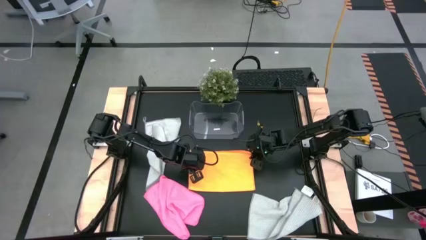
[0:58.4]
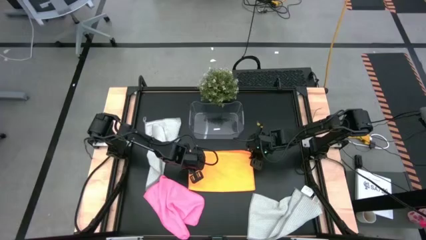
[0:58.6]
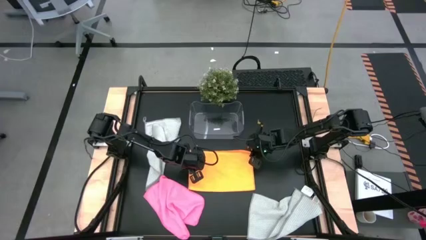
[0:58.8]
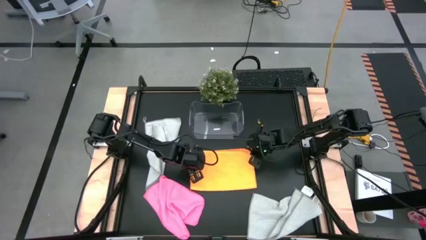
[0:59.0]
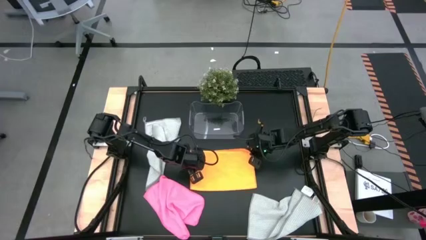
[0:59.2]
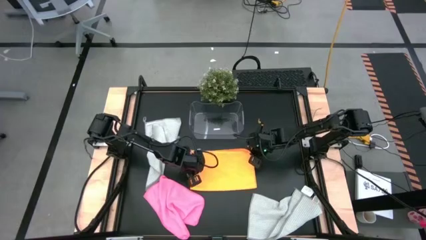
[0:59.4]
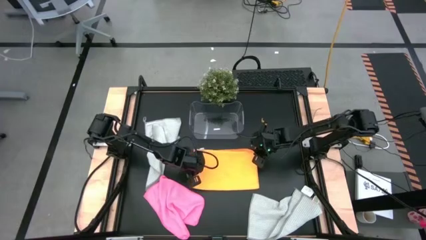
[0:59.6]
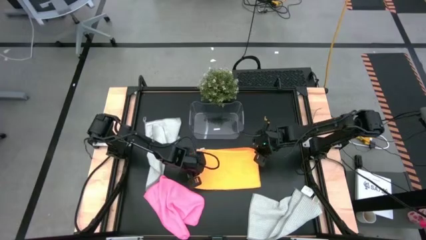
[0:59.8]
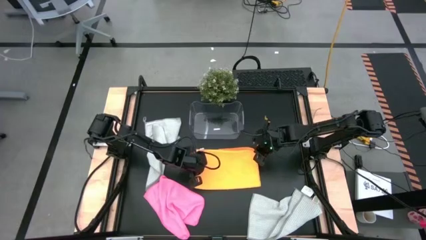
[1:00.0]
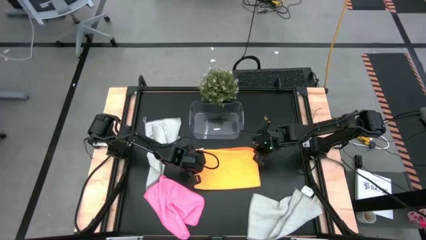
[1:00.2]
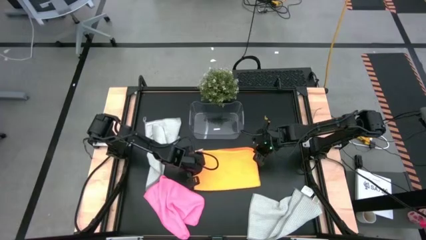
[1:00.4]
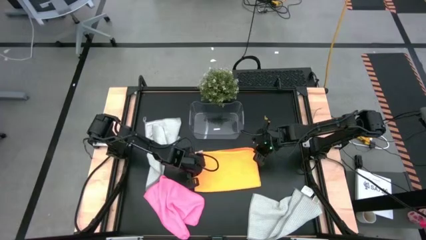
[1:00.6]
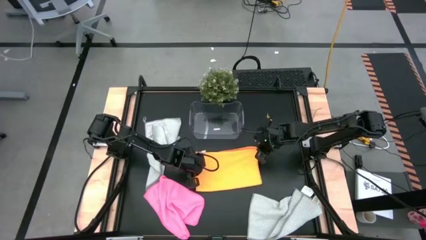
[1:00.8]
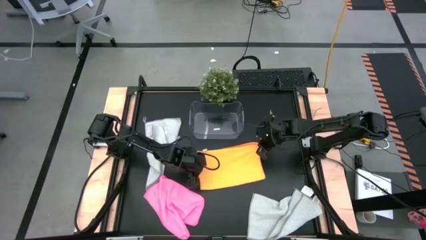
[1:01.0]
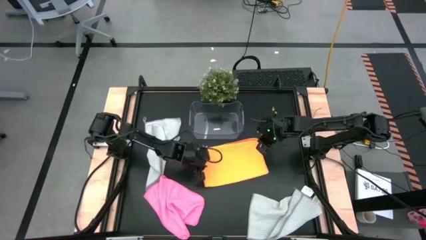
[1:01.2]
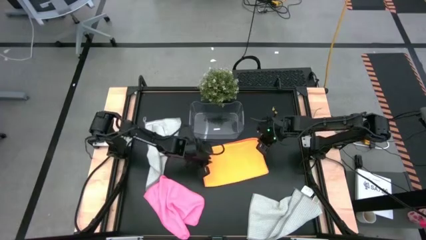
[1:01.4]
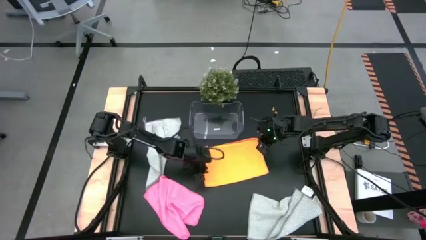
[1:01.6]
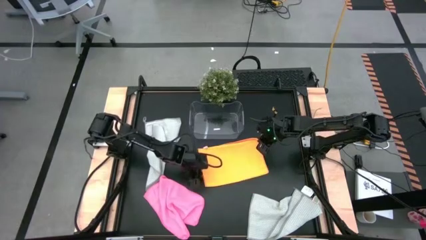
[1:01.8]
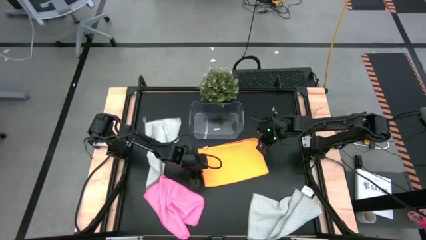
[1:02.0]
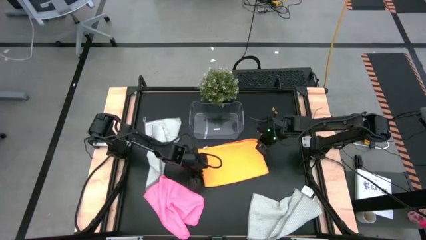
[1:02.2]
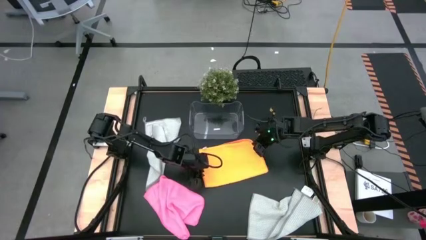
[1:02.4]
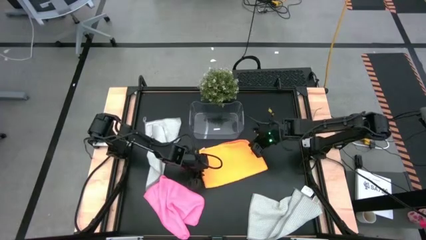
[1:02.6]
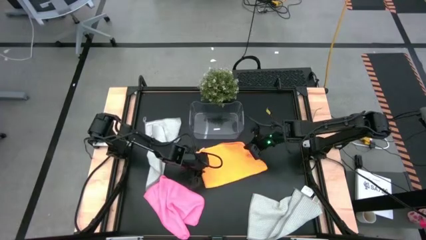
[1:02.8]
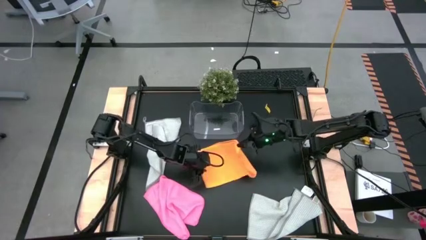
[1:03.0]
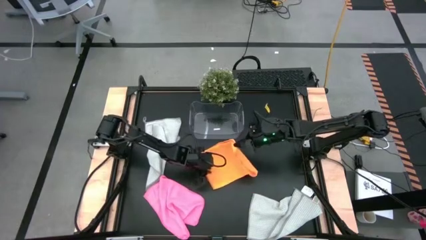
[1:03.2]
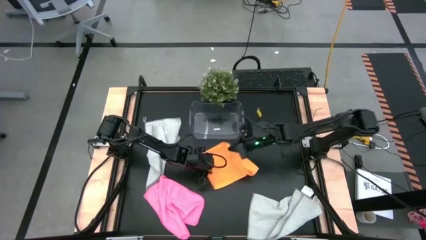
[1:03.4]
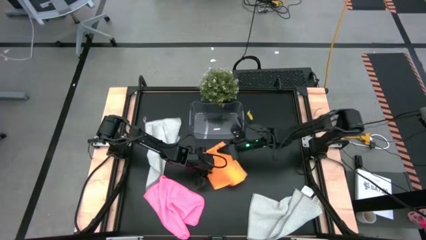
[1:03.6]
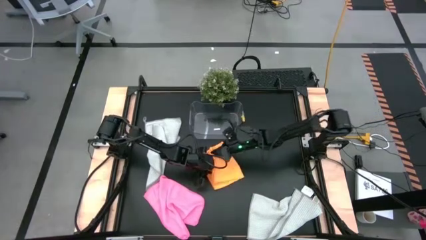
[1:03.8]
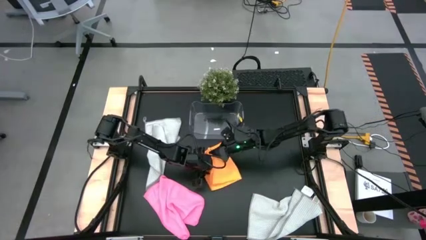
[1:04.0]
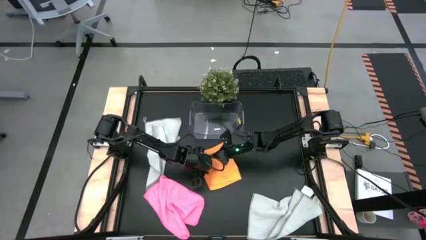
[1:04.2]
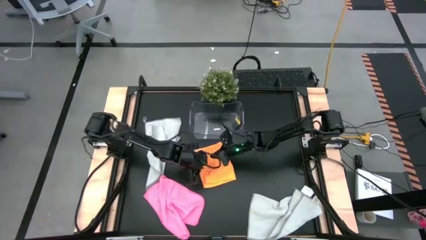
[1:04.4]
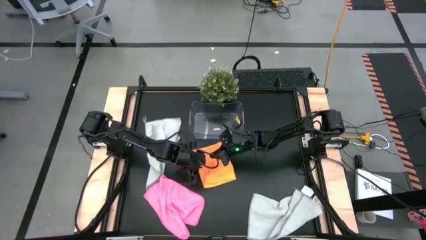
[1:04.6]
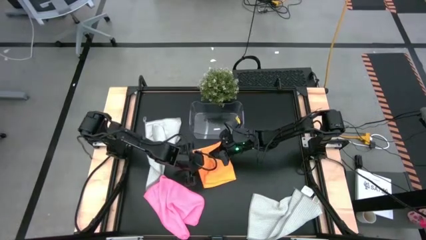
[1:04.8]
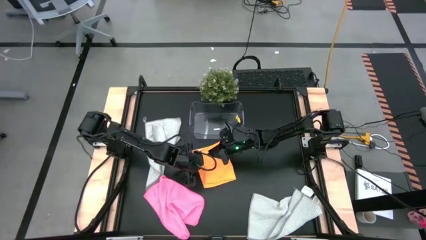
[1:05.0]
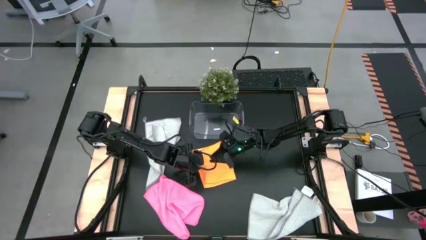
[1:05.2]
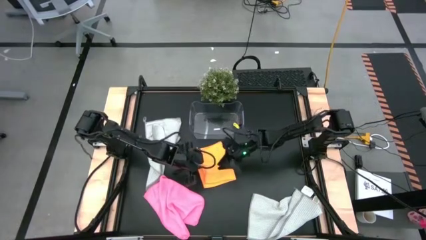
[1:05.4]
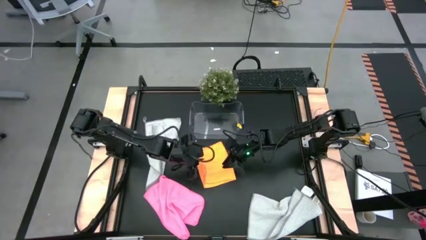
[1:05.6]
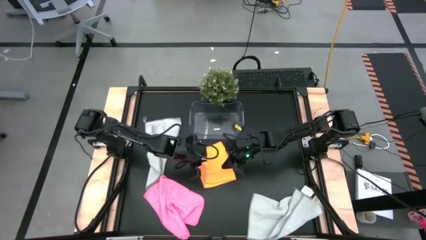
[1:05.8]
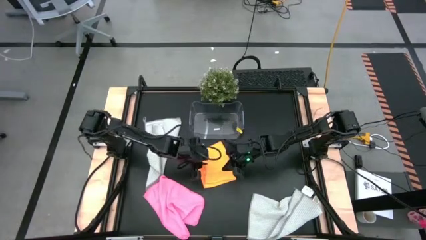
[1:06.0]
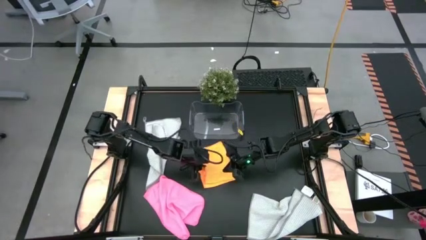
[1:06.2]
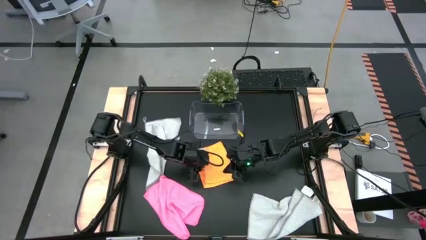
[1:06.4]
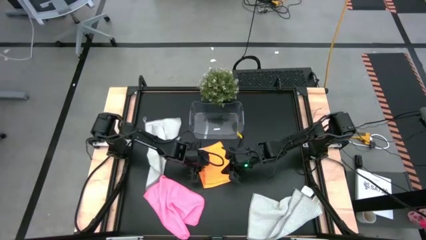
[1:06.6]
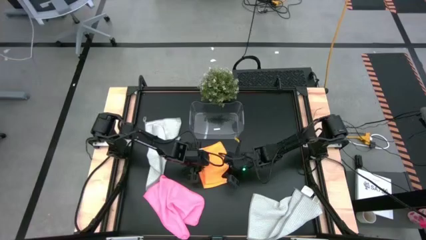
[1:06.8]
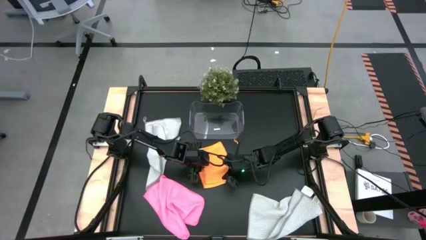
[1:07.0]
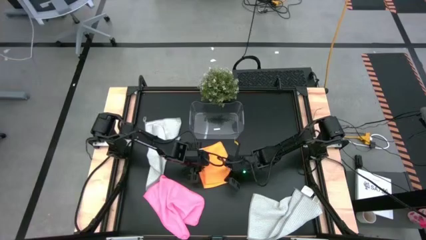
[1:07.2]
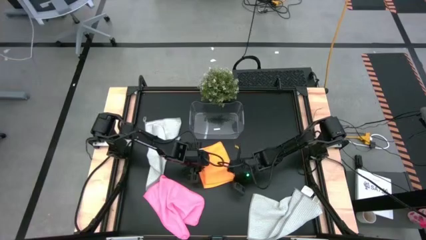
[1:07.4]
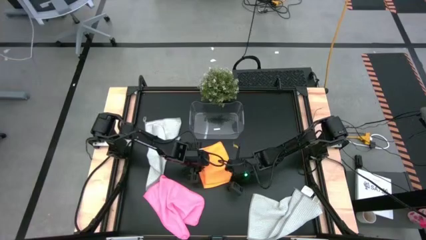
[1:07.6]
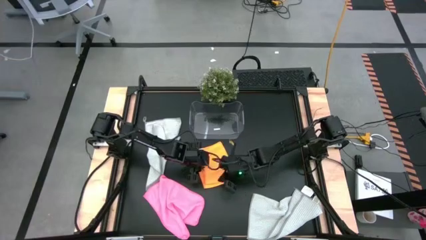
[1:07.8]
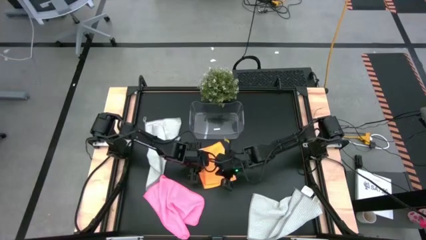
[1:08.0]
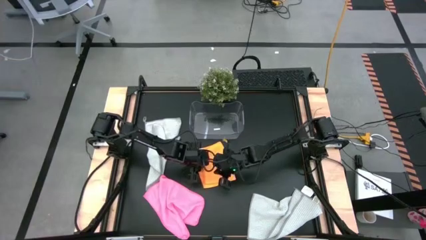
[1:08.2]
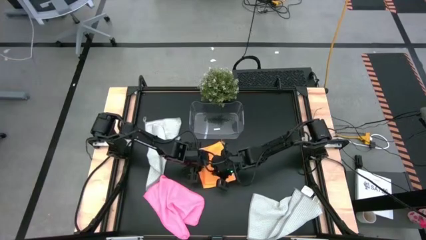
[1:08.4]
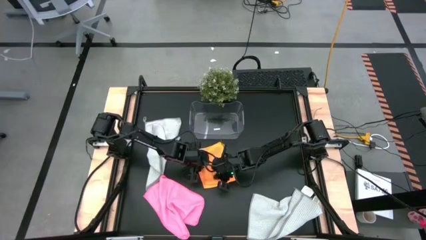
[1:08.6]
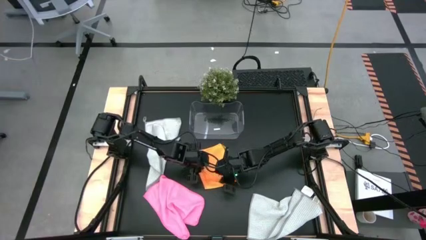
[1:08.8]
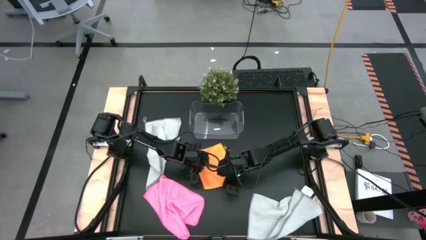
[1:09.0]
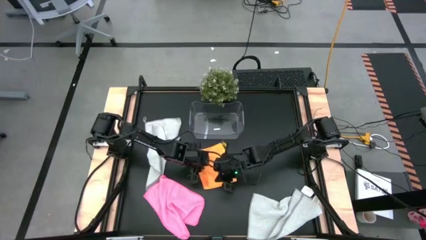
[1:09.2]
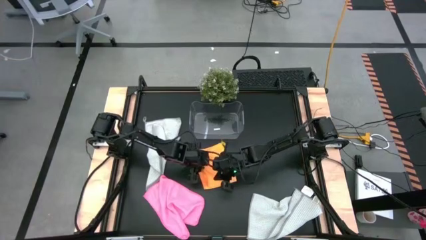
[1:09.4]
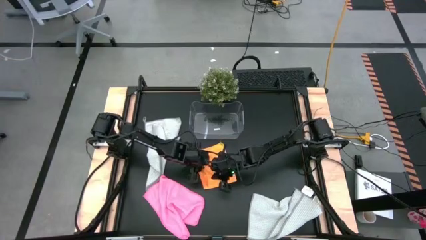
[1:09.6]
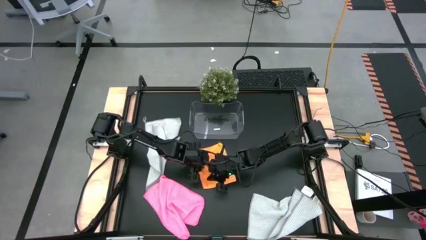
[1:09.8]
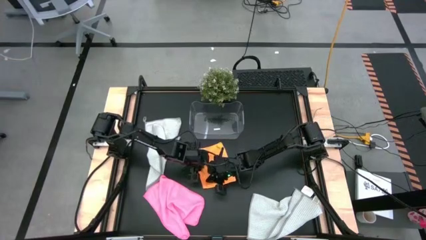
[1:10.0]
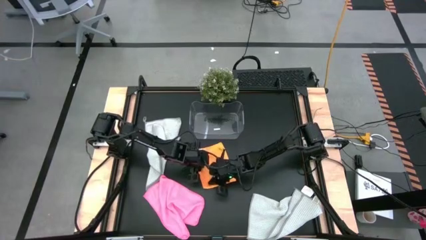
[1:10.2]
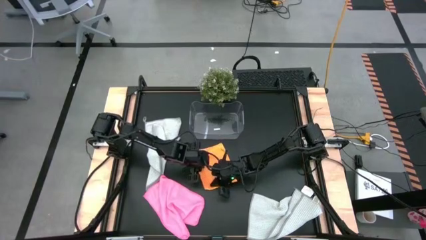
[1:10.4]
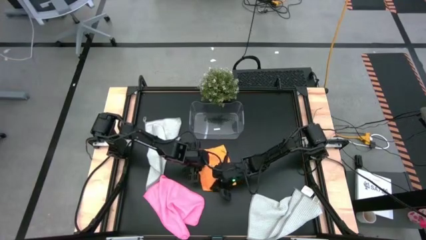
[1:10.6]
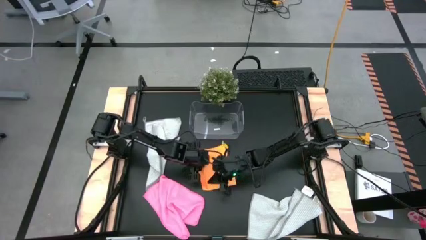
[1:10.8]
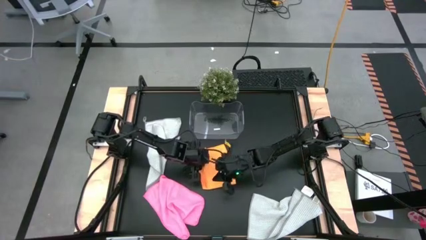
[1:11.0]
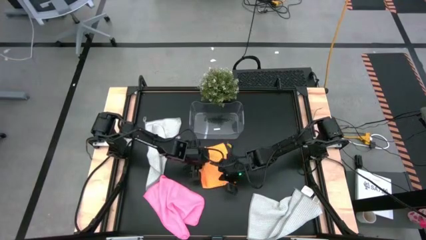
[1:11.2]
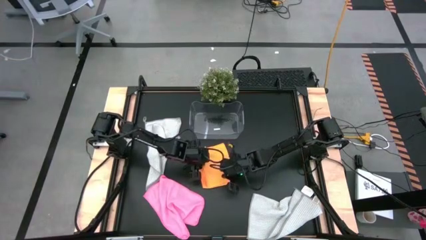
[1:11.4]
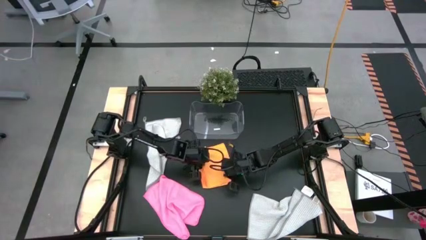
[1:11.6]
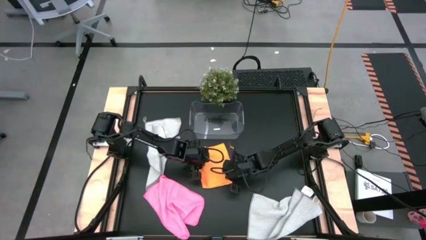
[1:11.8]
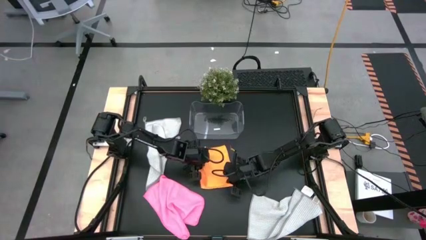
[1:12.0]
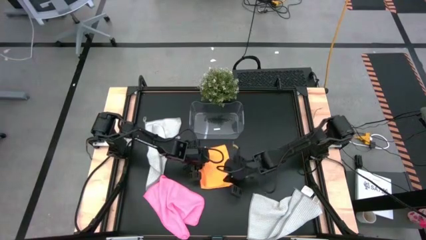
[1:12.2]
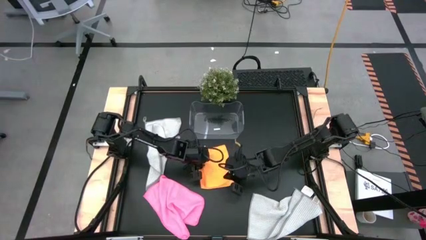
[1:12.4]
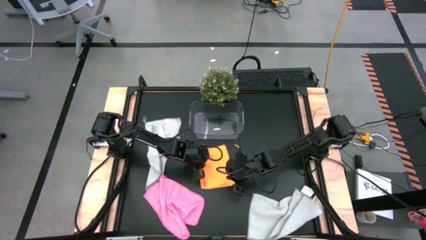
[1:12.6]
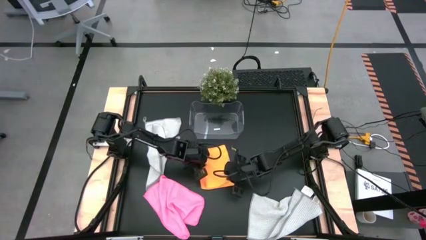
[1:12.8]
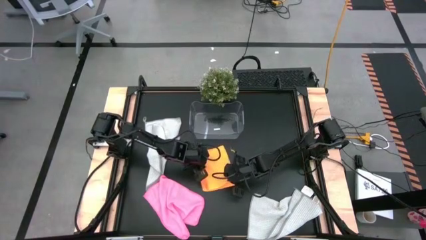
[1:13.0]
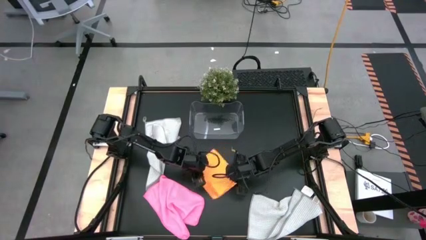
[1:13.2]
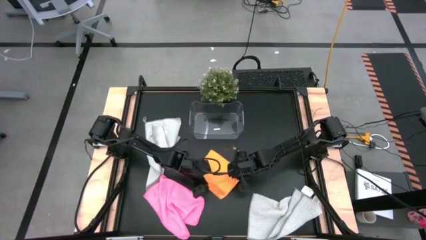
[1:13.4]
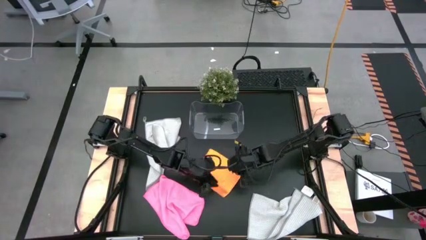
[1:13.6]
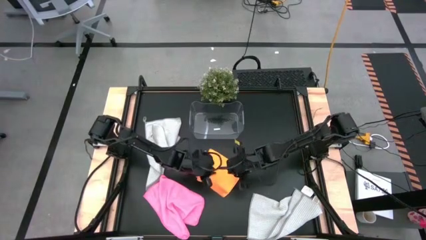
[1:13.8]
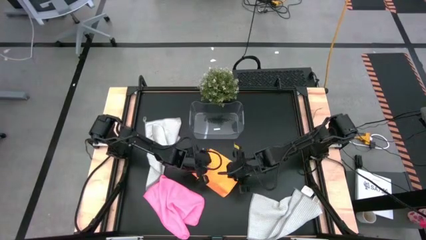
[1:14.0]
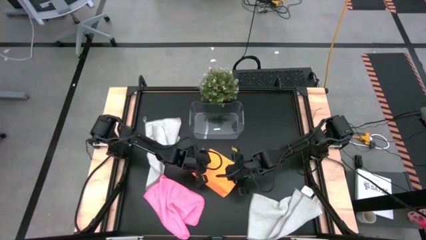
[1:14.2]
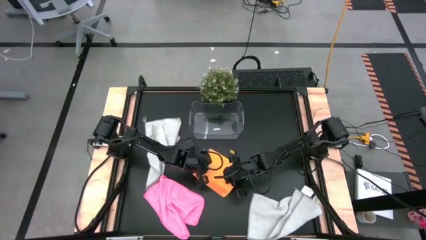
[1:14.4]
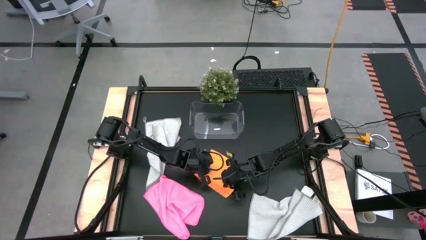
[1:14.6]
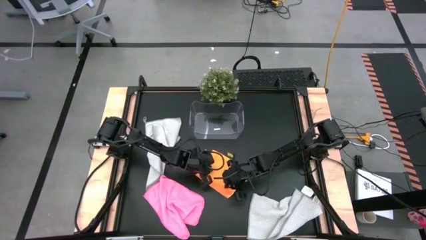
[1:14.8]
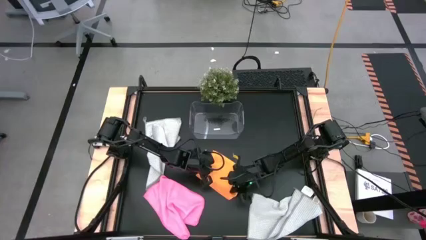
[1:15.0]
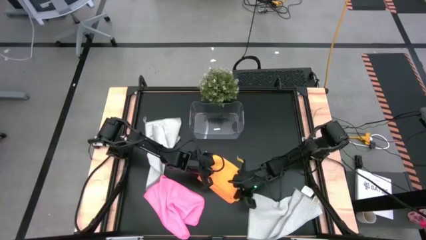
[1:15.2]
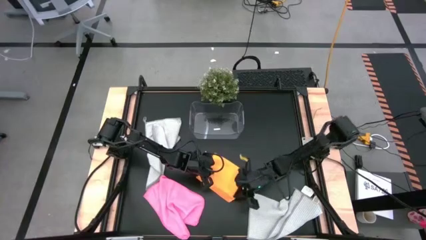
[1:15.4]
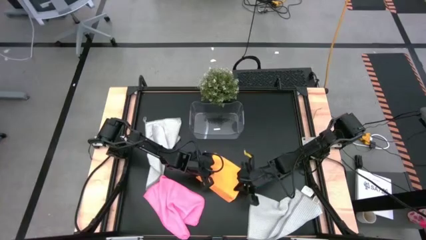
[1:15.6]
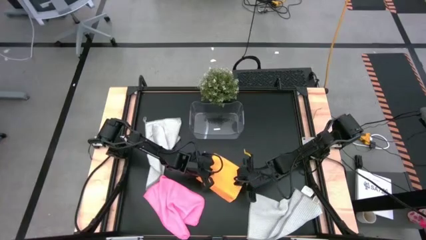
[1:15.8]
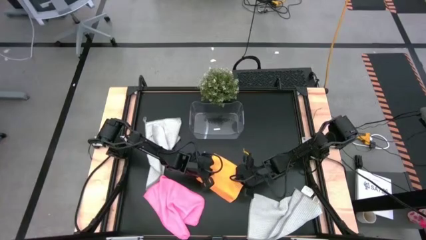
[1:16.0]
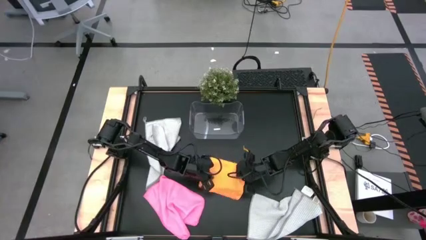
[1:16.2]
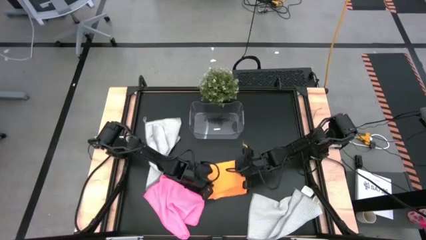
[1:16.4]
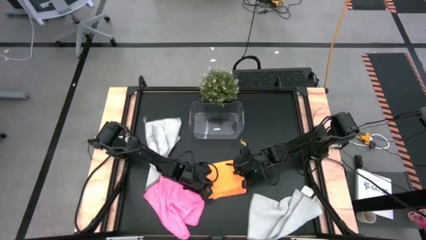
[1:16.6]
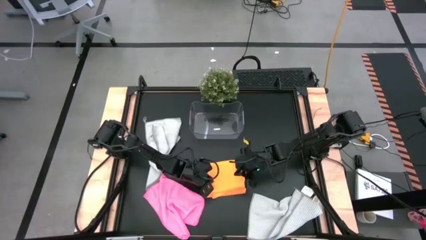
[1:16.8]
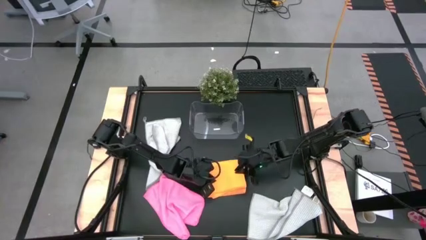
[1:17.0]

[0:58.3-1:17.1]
Task: Fold microfiber towels
Fold the orange microfiber towel on the table
